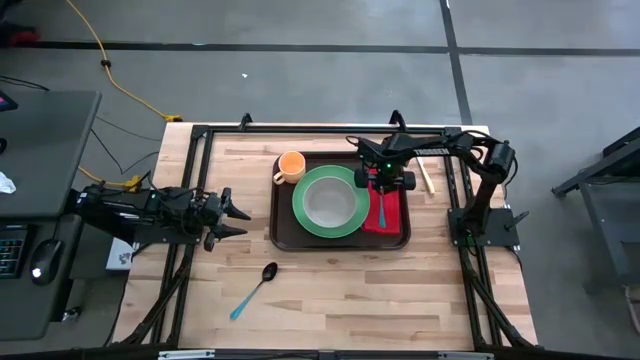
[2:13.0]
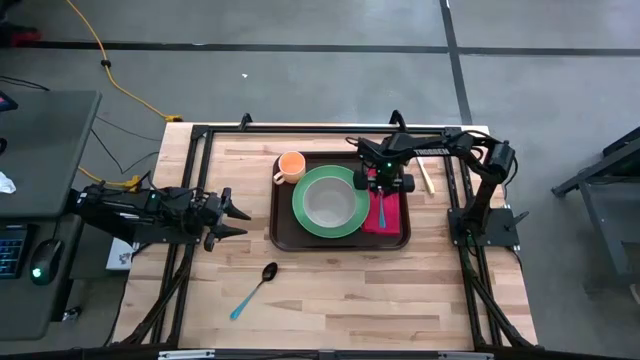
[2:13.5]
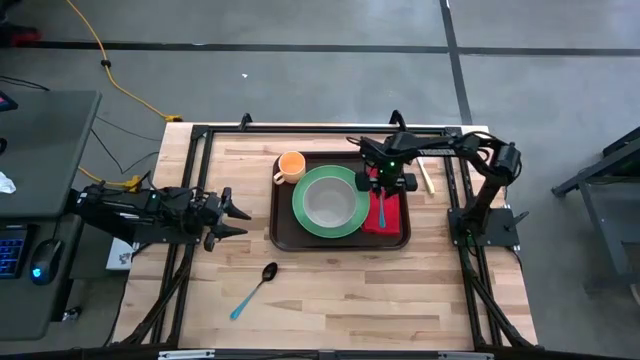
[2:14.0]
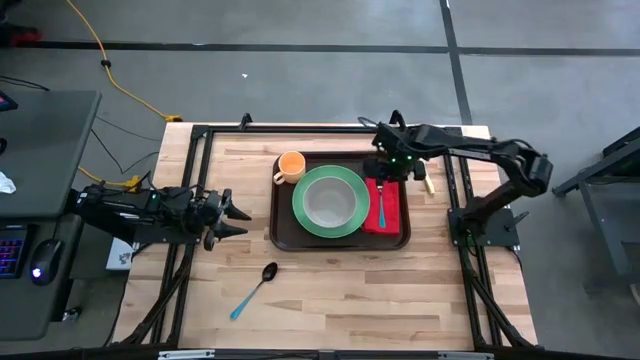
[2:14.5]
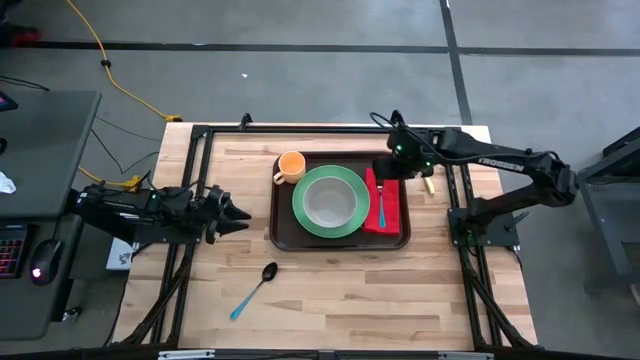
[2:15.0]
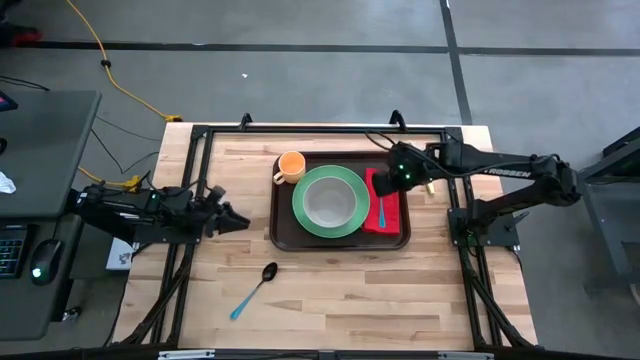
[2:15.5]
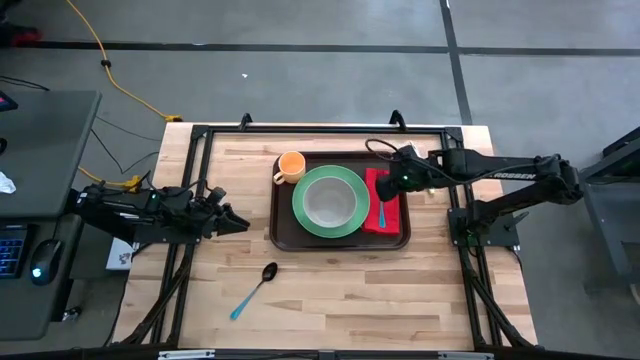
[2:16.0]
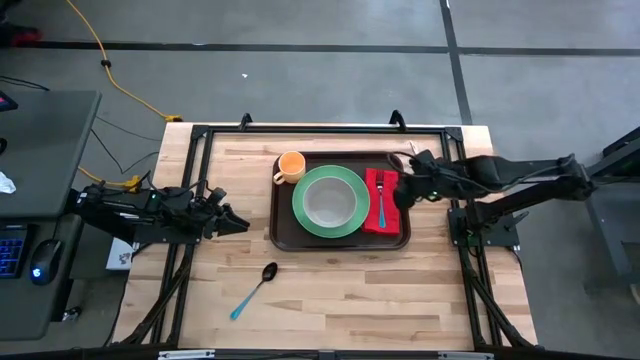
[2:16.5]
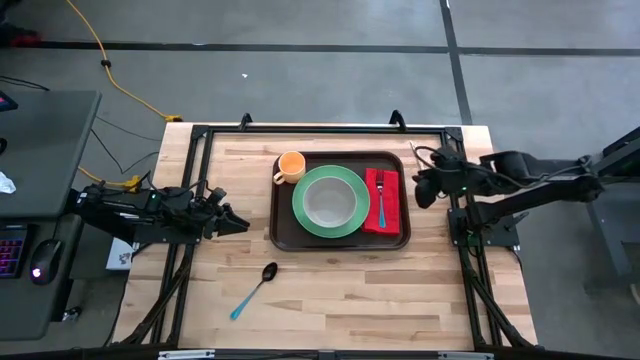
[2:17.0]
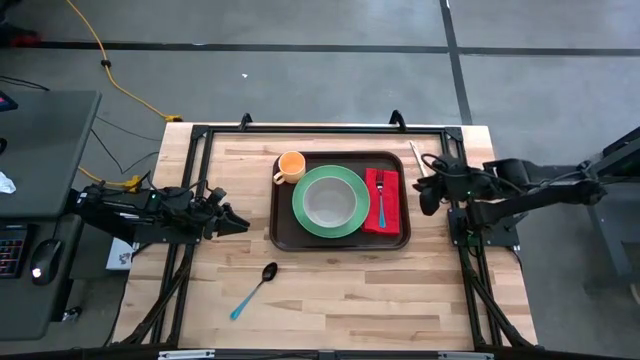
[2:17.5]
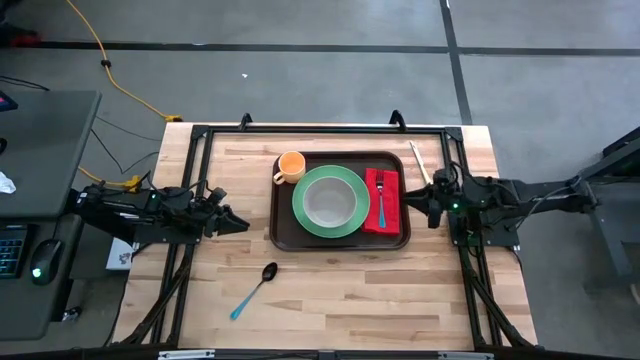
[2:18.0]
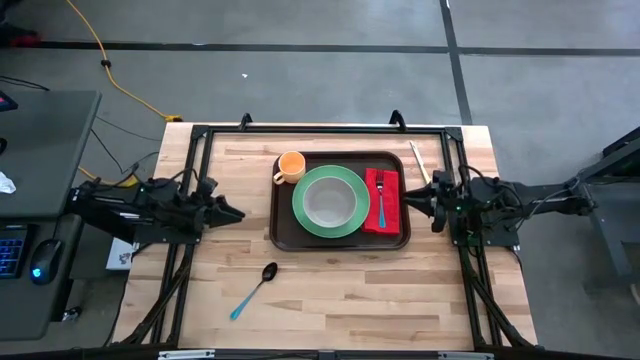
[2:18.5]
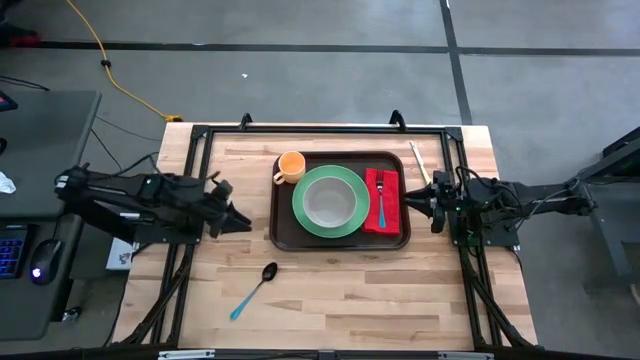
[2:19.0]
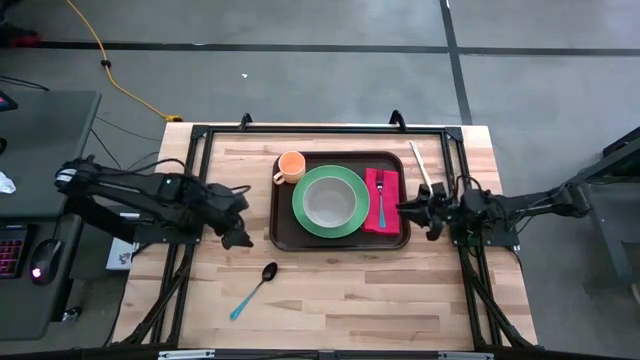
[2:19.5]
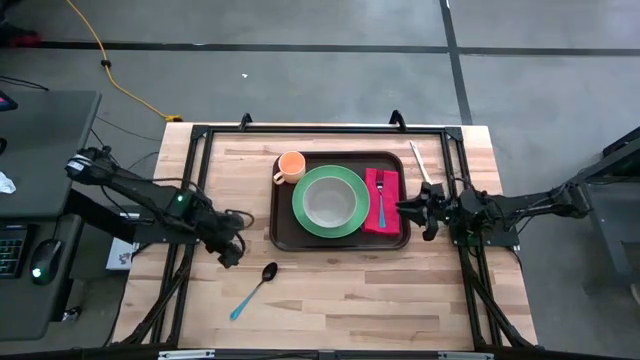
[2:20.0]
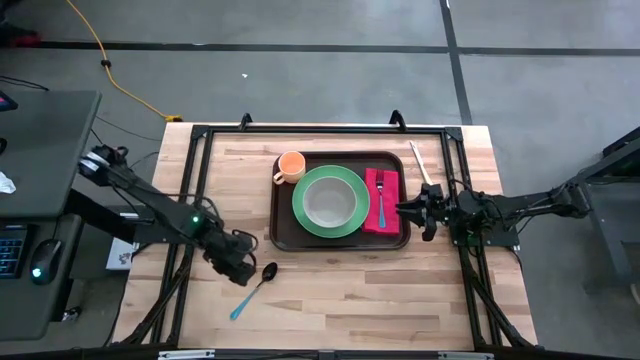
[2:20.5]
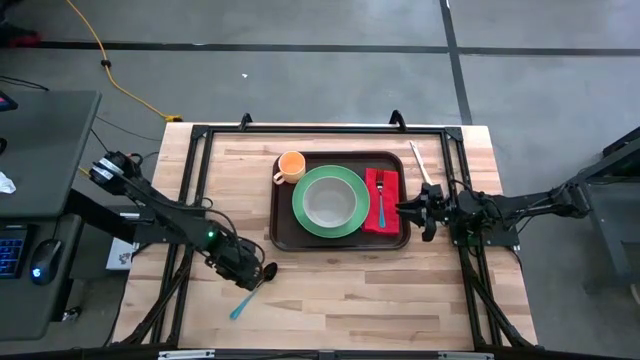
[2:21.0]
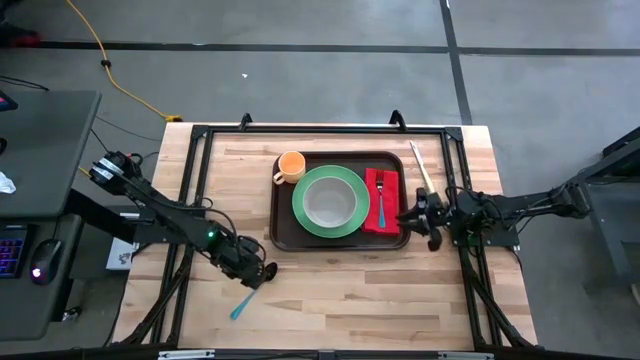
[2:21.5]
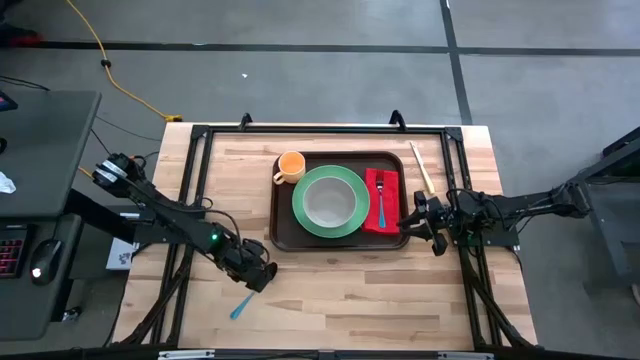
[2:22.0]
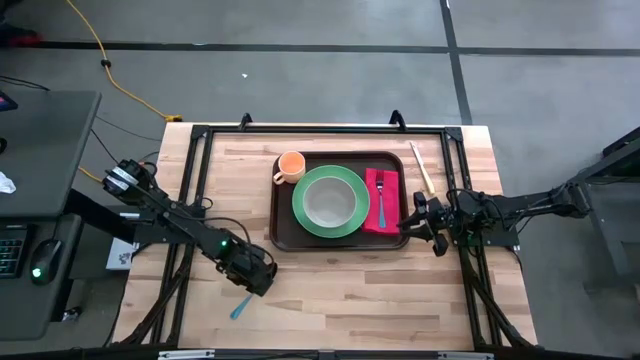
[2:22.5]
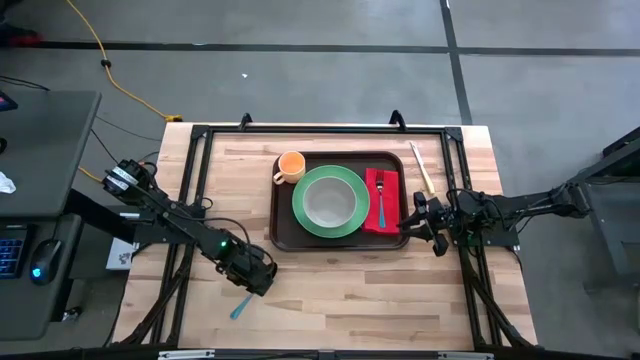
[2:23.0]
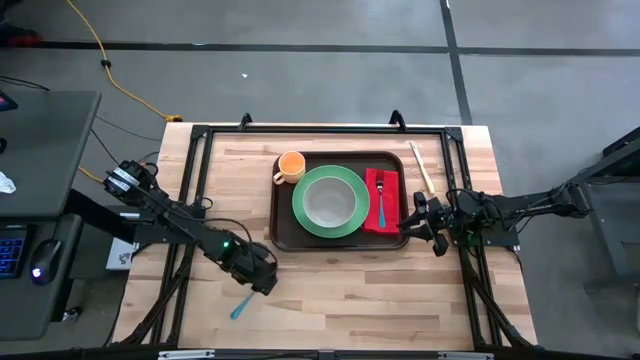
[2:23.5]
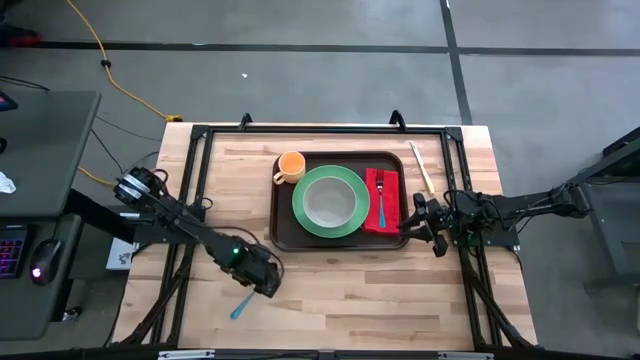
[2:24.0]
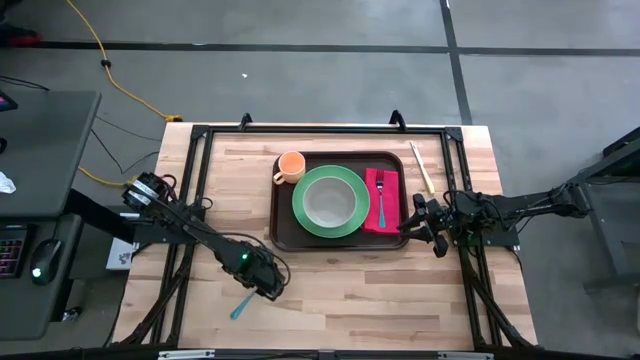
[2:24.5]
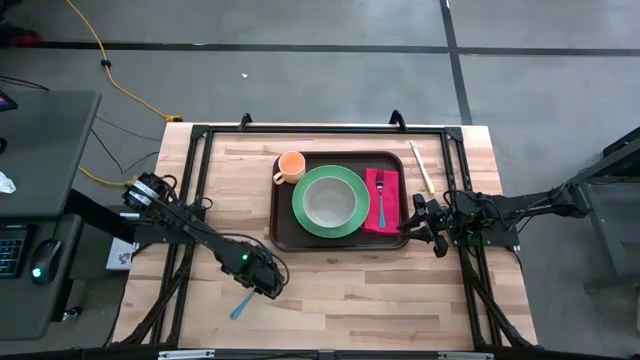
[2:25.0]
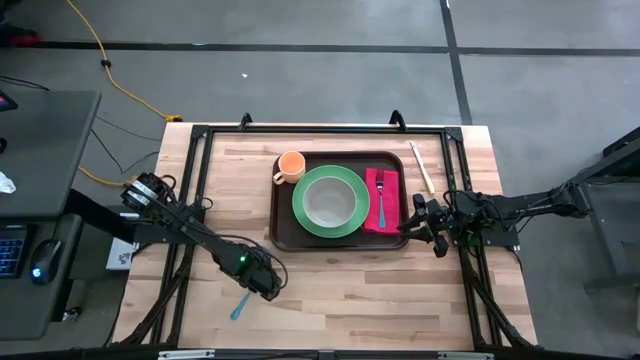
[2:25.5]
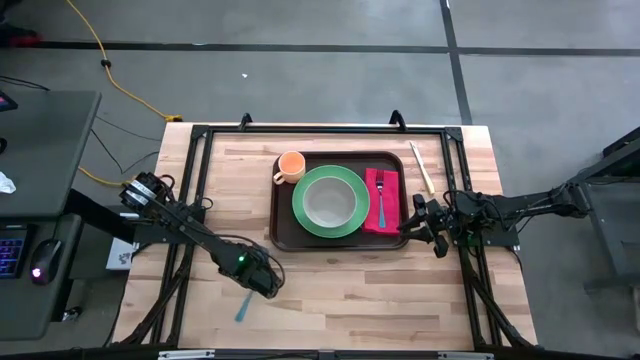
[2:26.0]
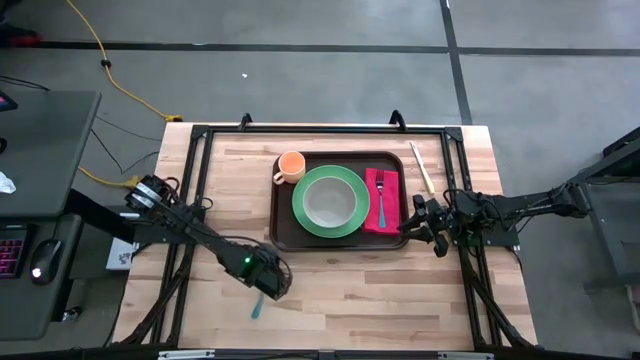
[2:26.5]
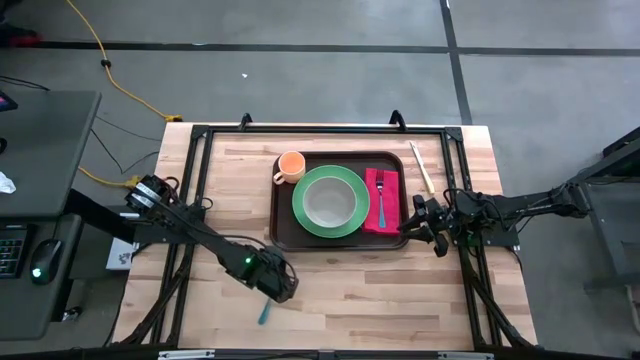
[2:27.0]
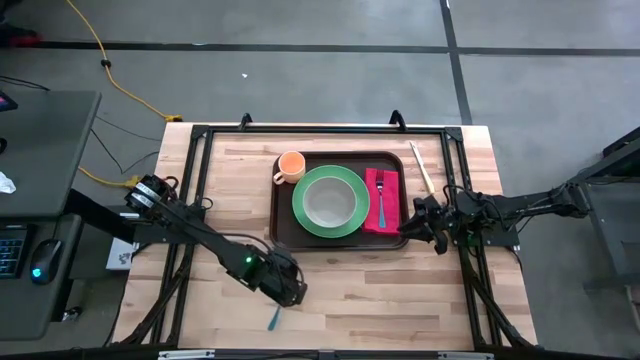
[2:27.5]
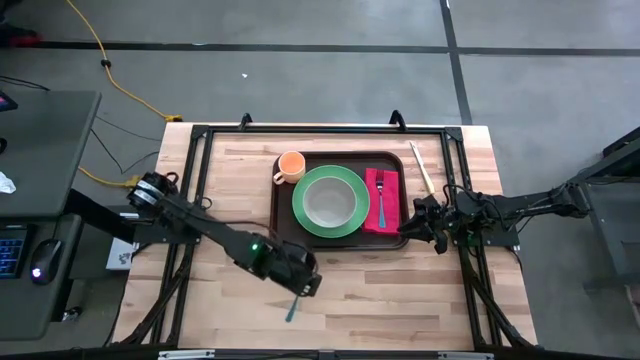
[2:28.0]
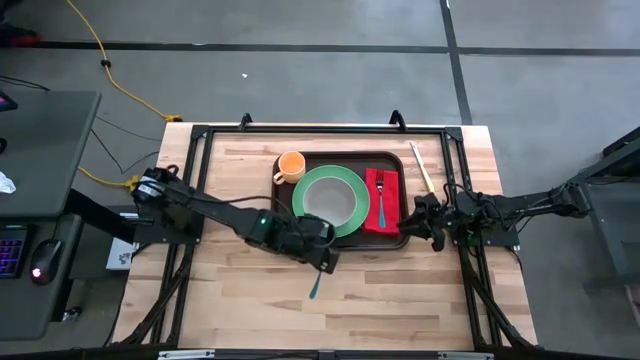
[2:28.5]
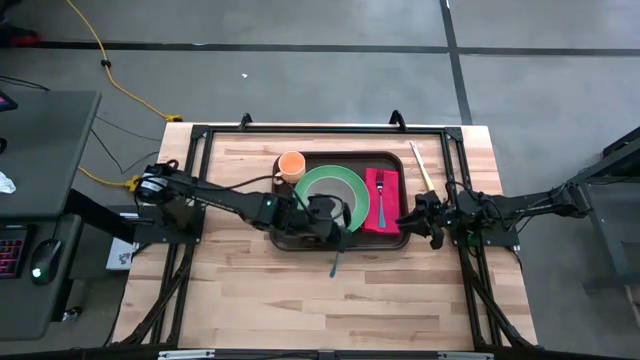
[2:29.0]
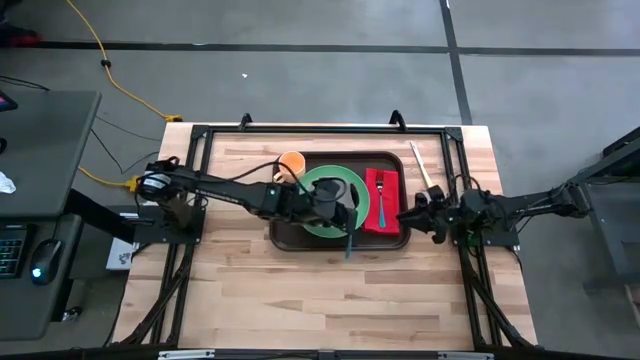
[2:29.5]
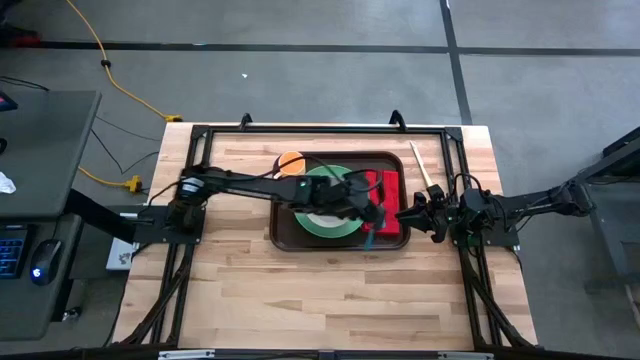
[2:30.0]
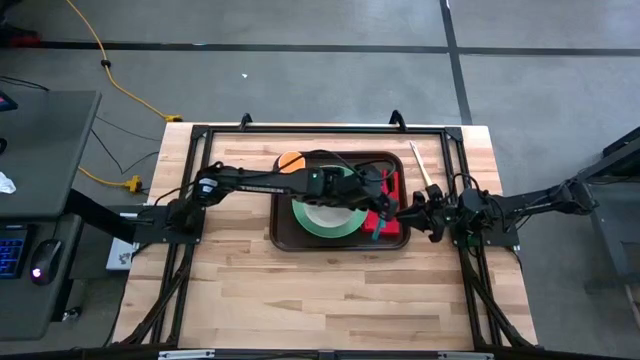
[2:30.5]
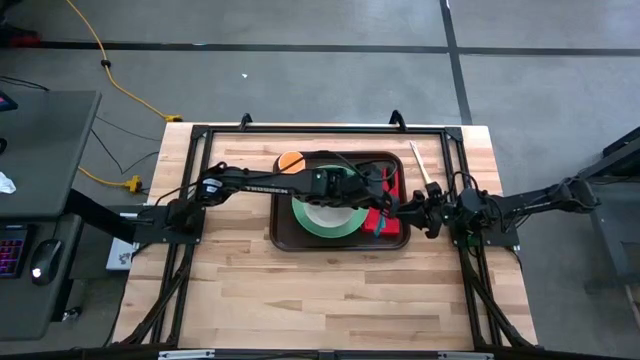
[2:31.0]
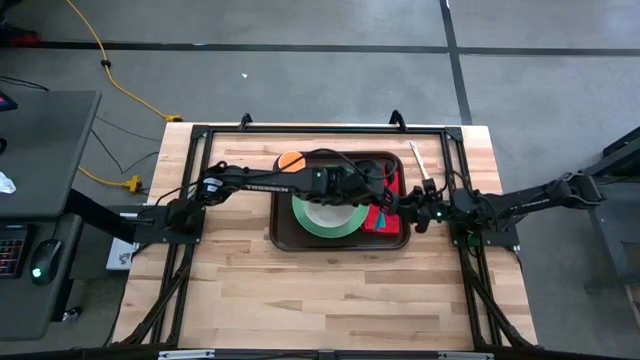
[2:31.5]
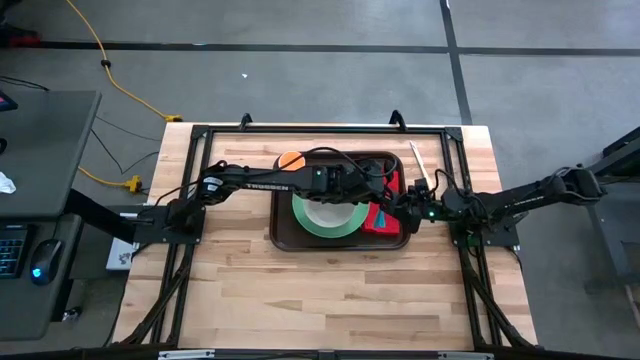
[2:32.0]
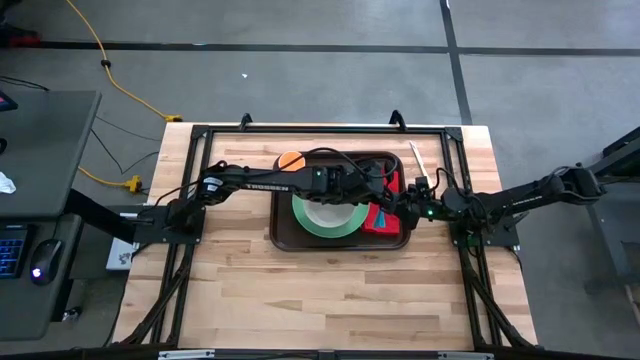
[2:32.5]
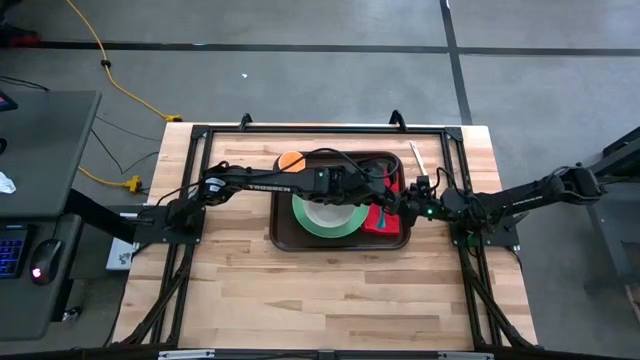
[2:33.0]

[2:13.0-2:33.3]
Task: Set up tray
Put the blue spoon on the red napkin to the left of the blue fork
